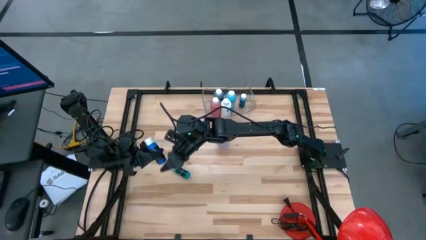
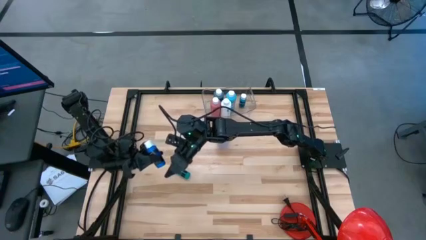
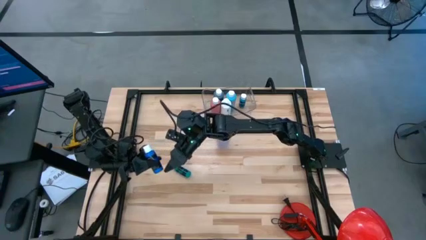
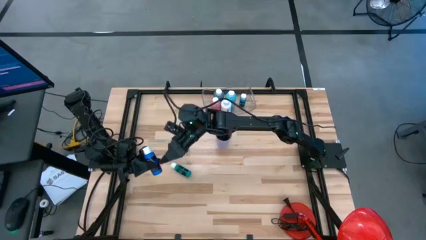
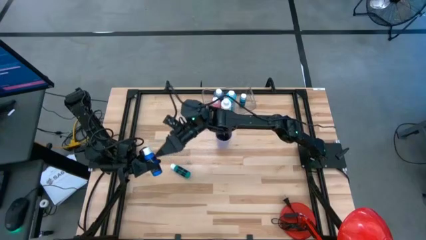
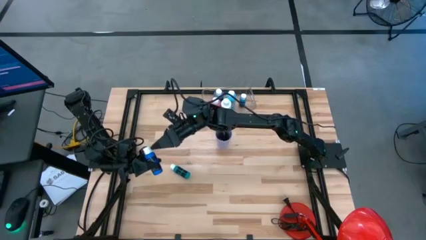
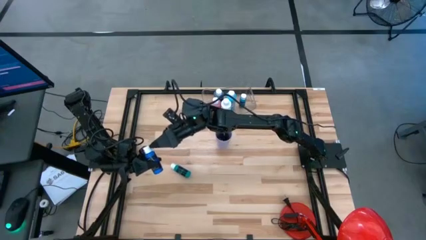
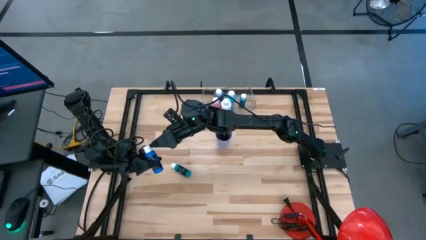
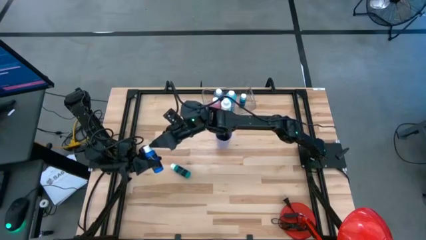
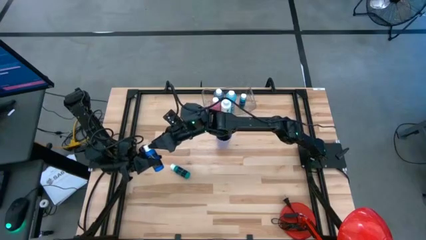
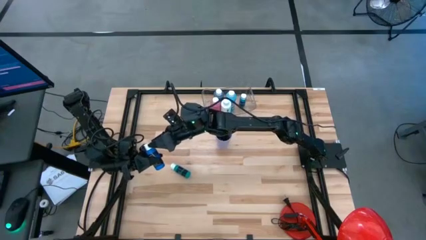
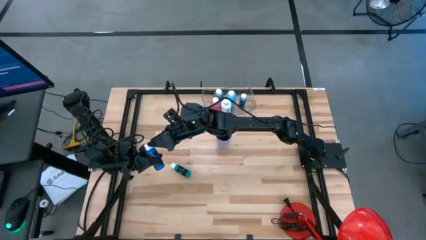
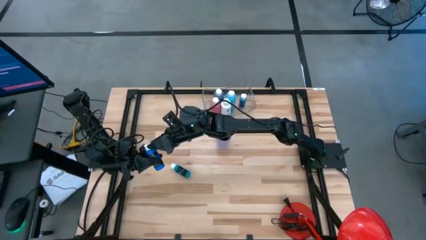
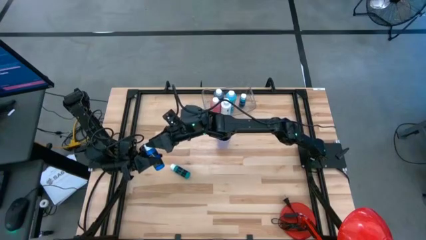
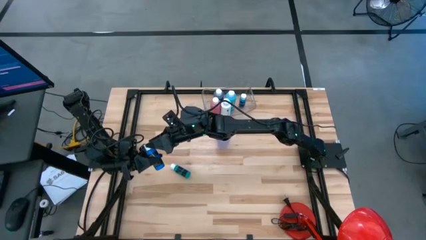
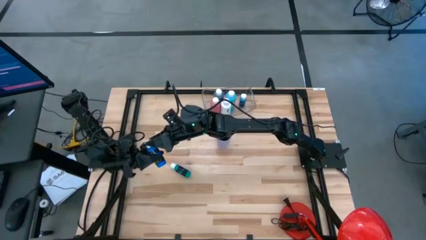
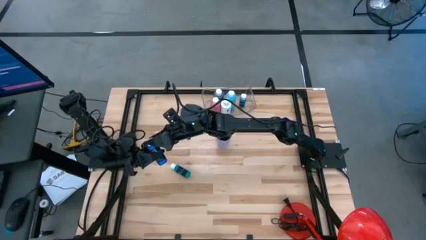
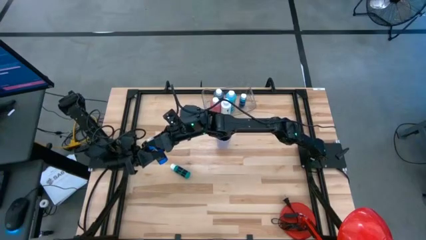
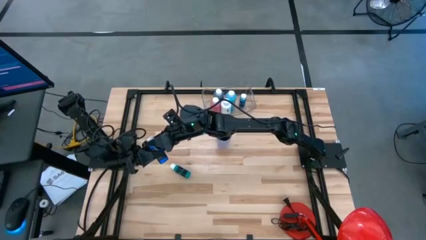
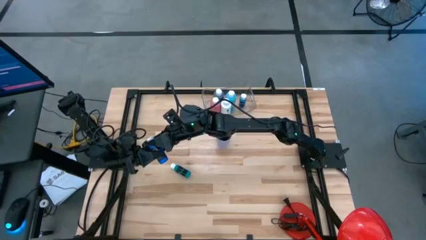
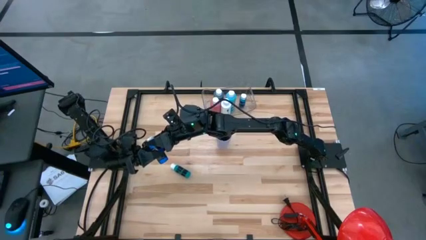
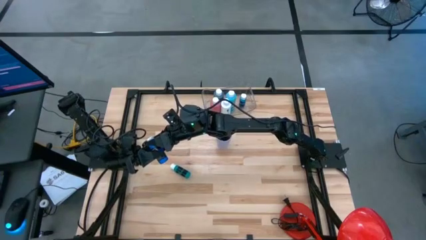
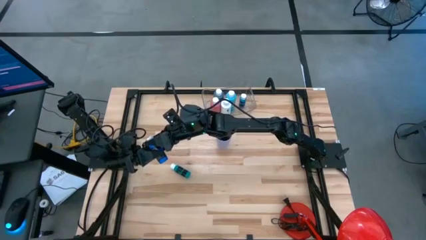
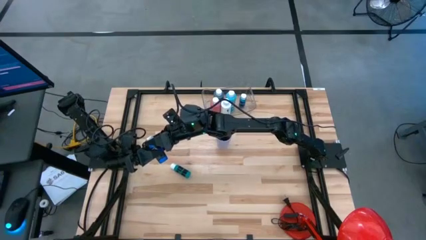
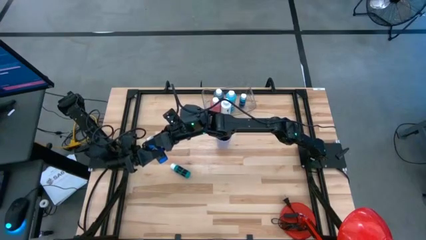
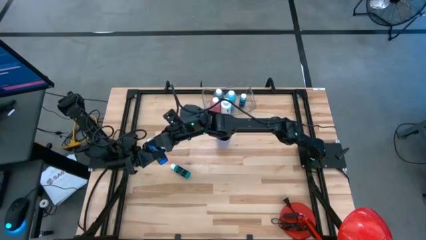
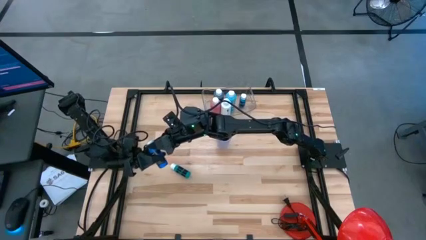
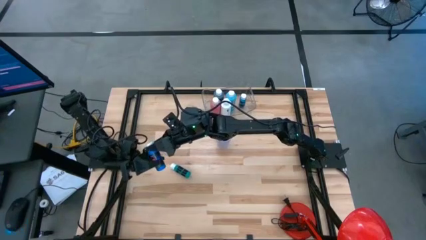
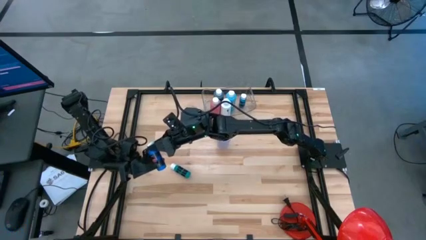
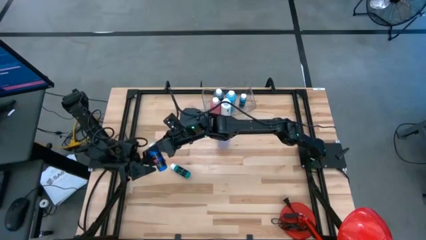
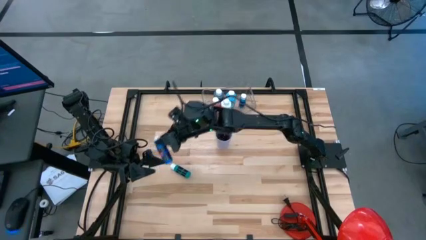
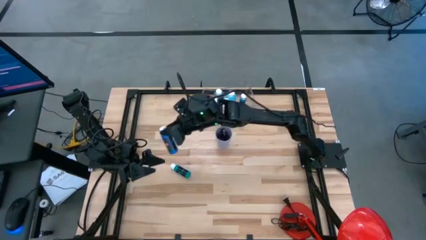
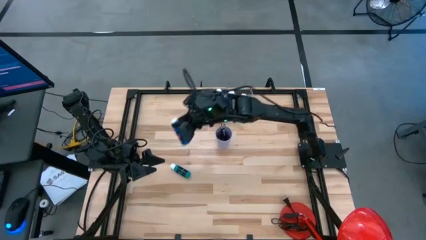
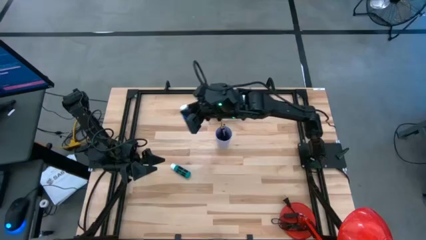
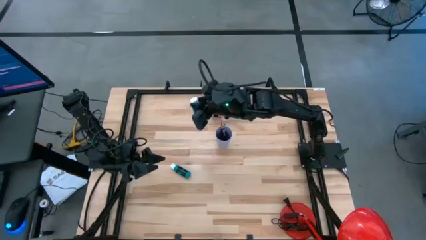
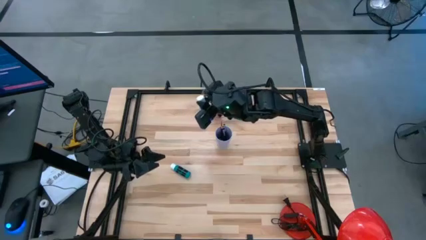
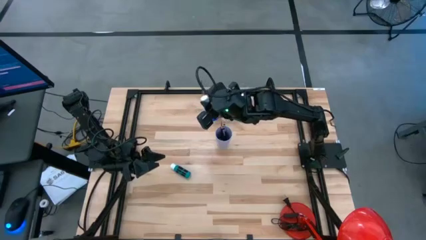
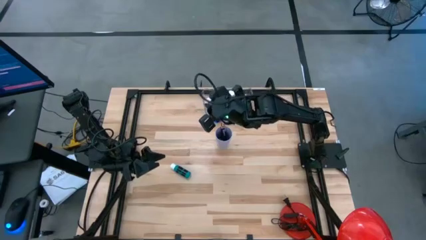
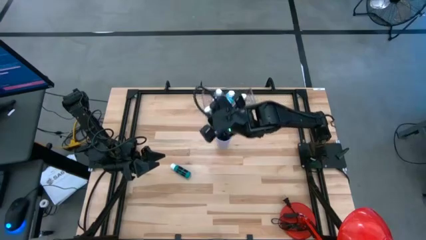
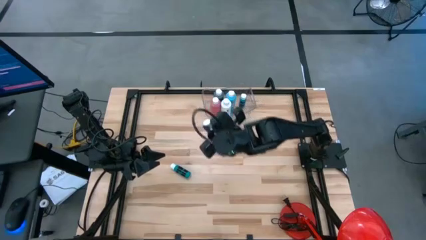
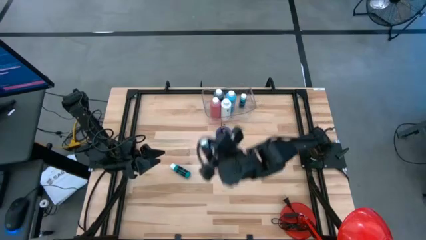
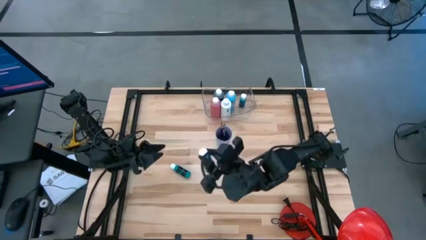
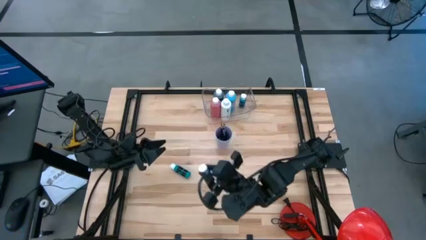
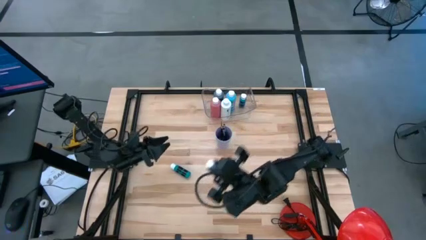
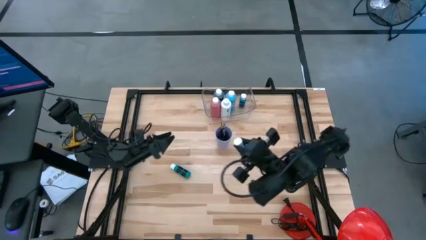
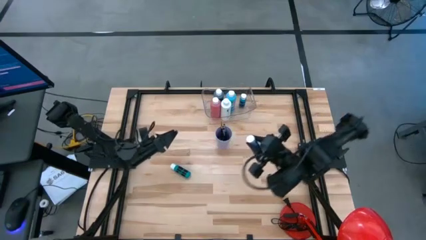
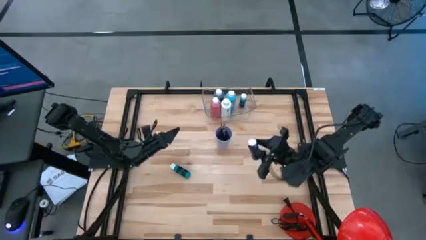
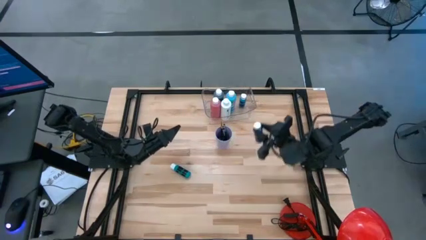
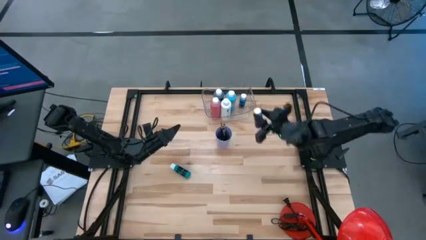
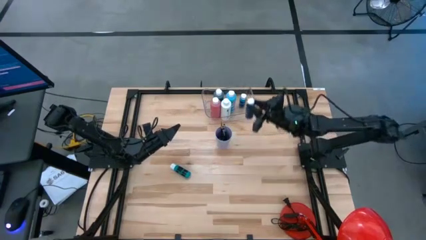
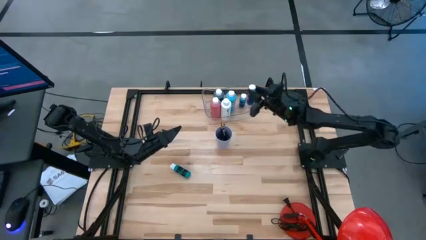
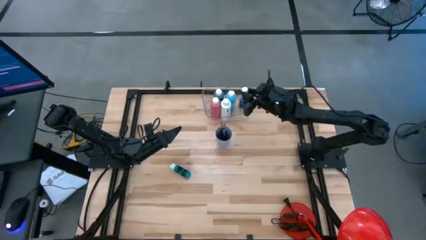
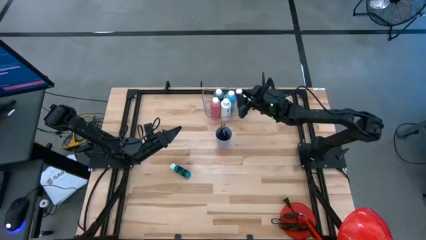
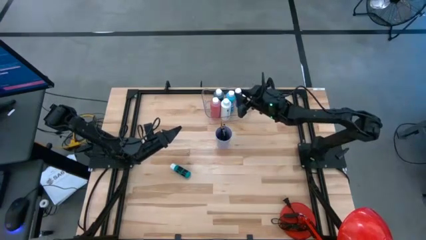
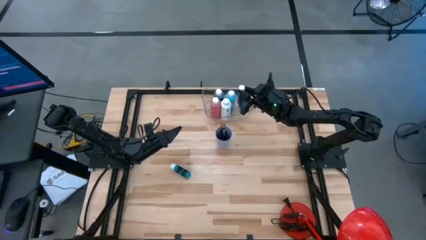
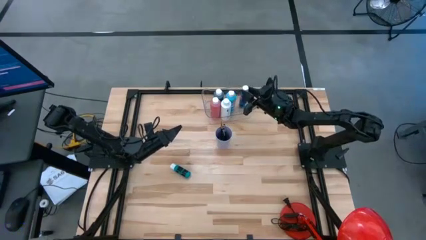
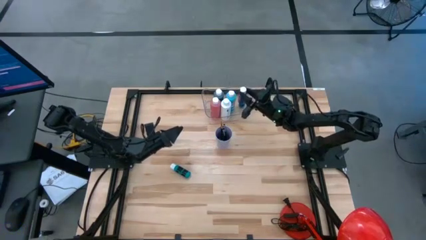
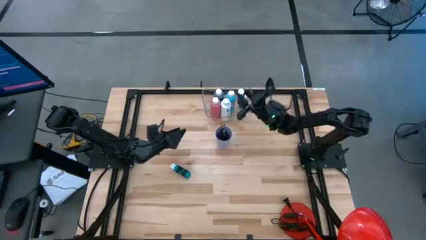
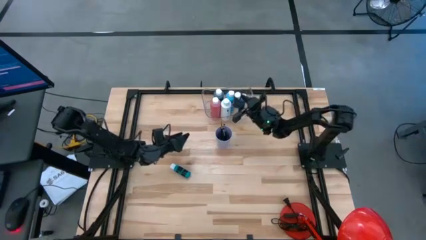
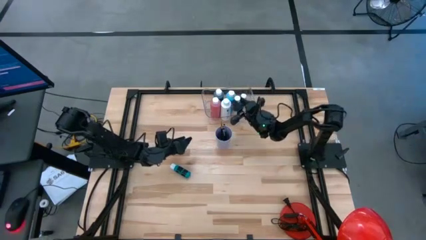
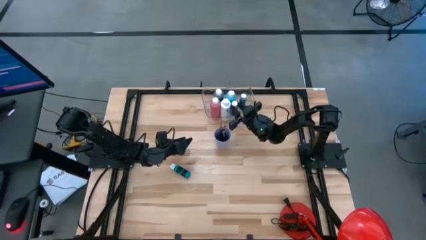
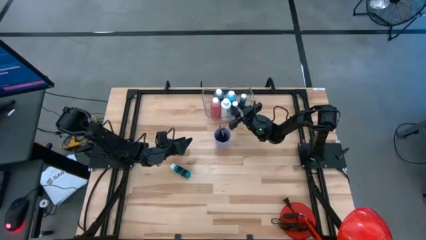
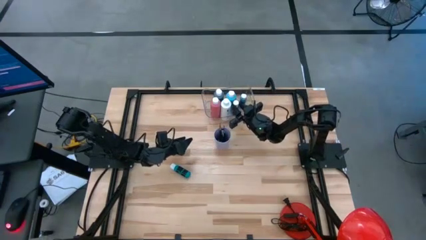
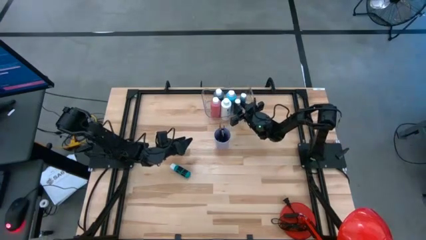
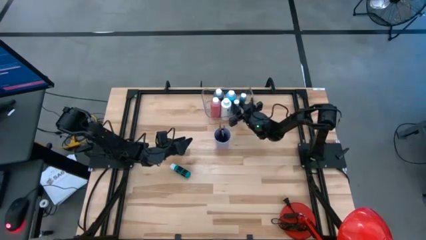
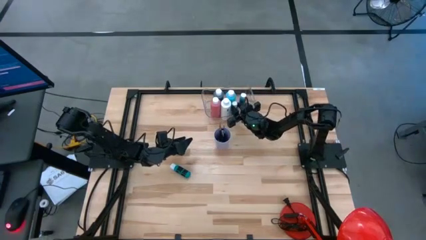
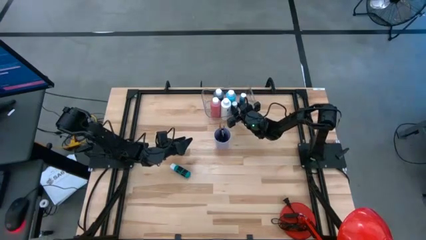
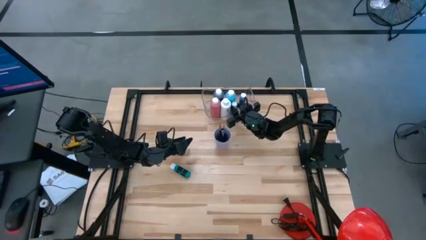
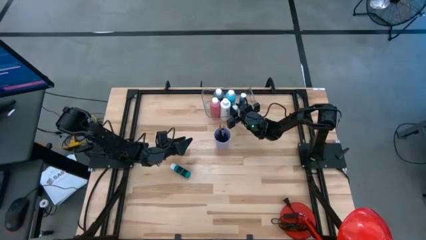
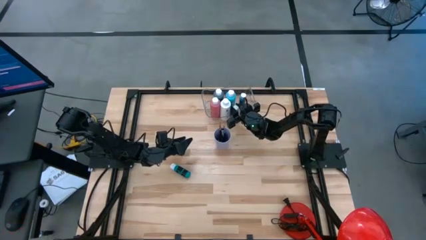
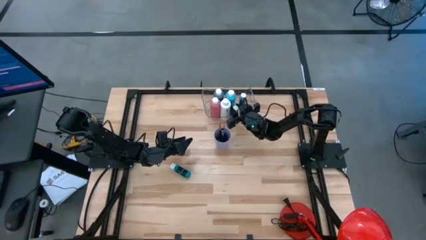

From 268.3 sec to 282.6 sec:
Task: Pick & Place Paint Supplies
Put the blue paint bottle into the transparent bin

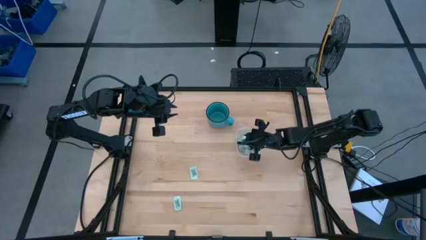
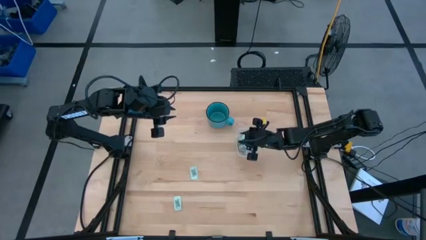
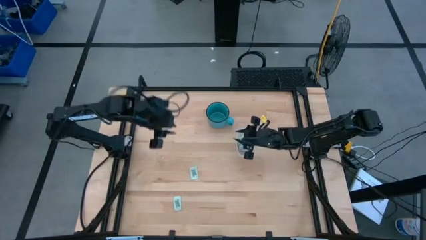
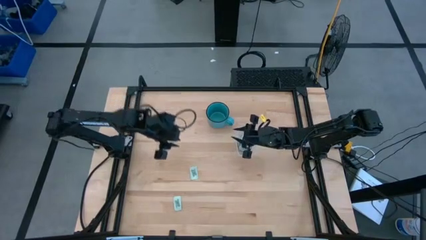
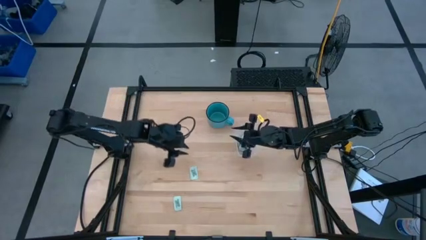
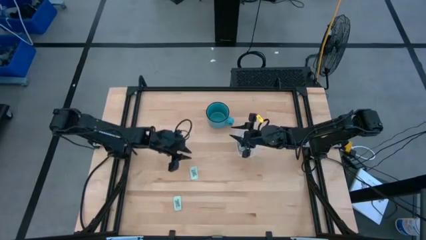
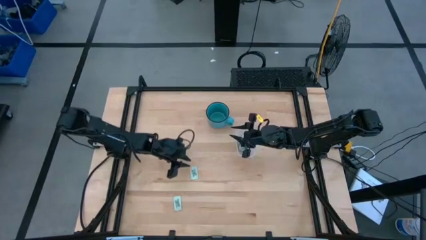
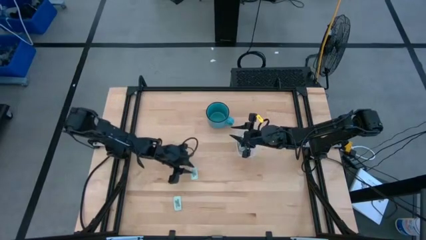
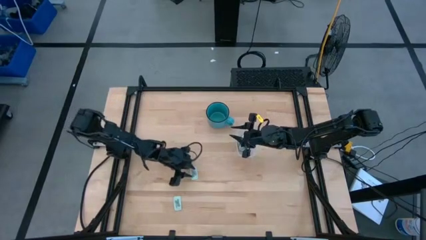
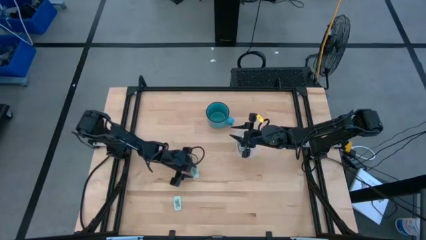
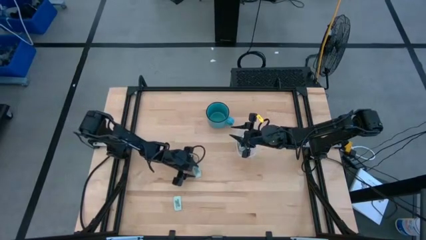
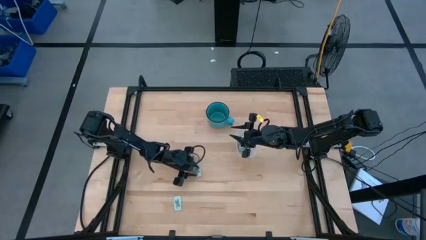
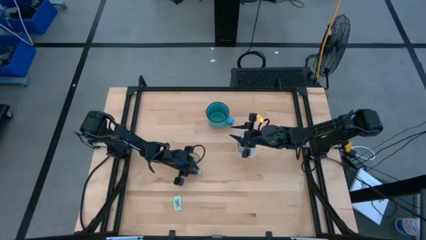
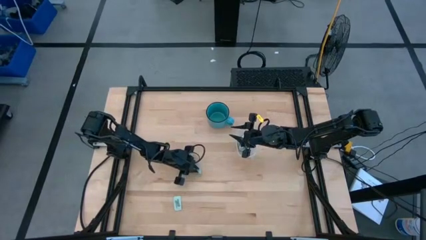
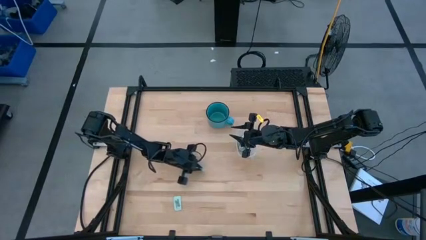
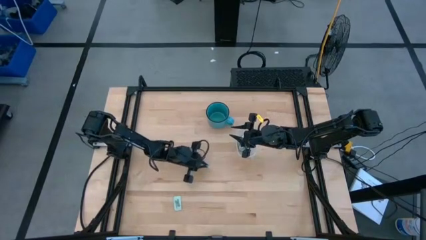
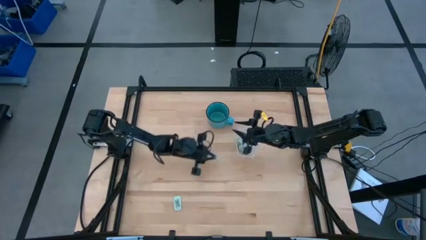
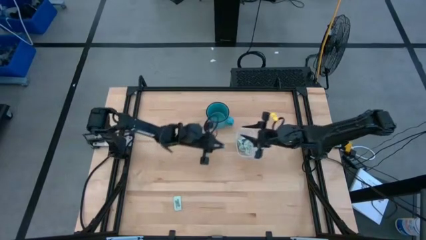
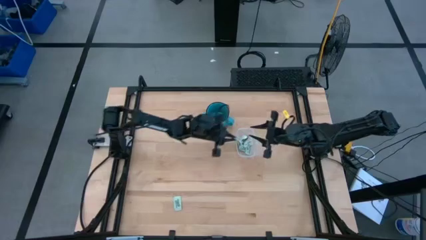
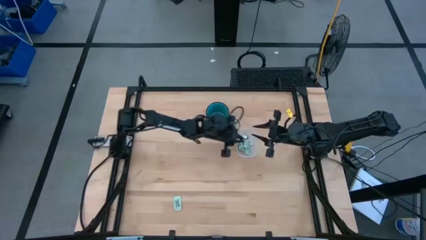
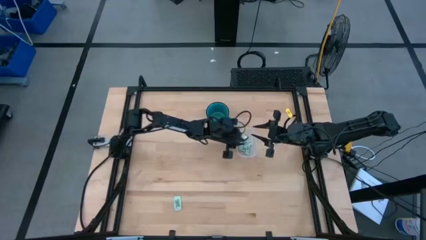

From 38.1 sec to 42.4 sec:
Task: Pick and place Stevia / Truvia into bins
Put the stevia packet into the transparent bin
